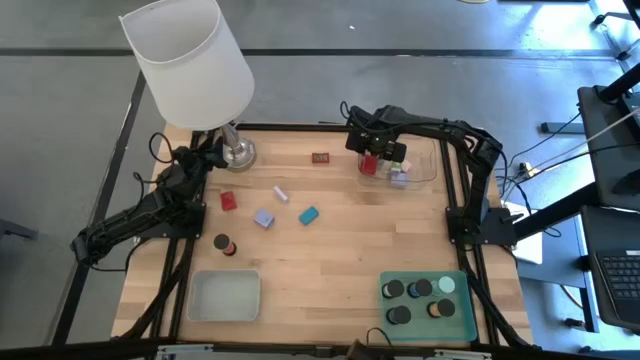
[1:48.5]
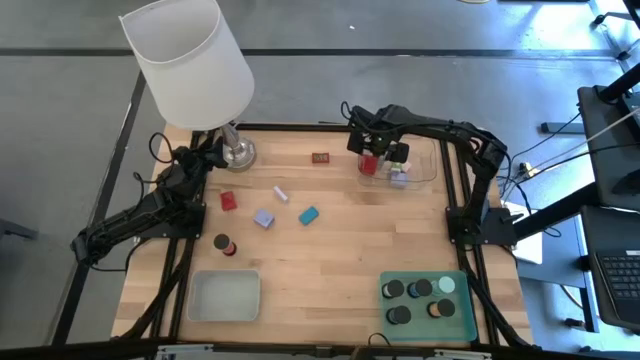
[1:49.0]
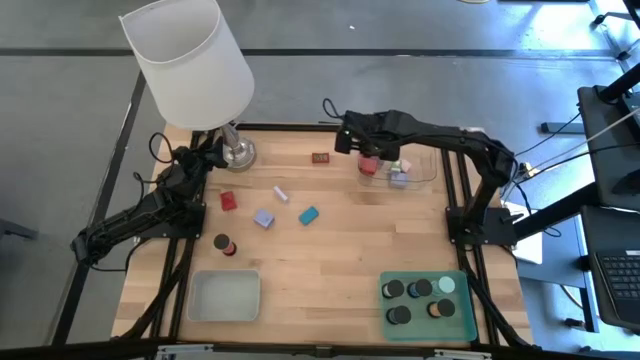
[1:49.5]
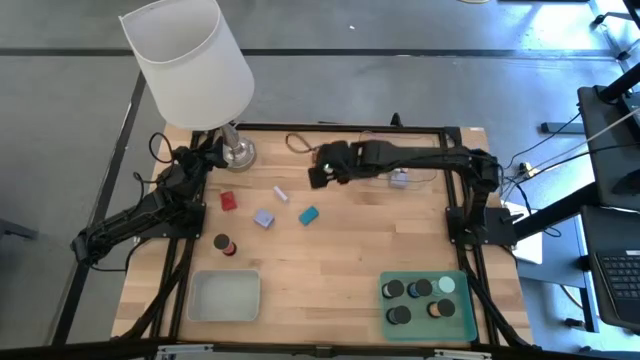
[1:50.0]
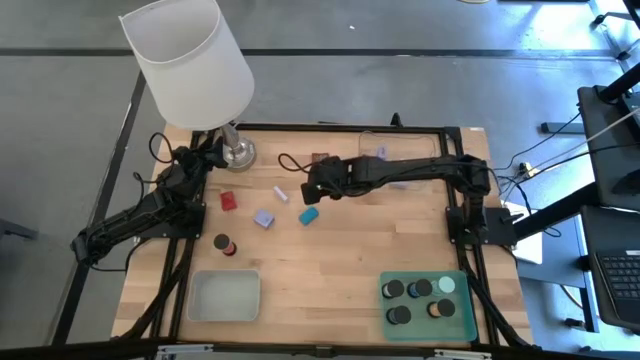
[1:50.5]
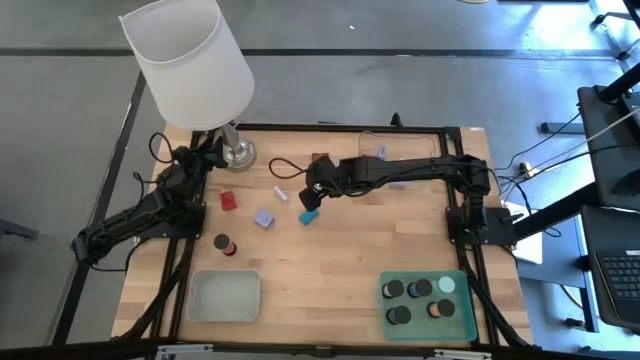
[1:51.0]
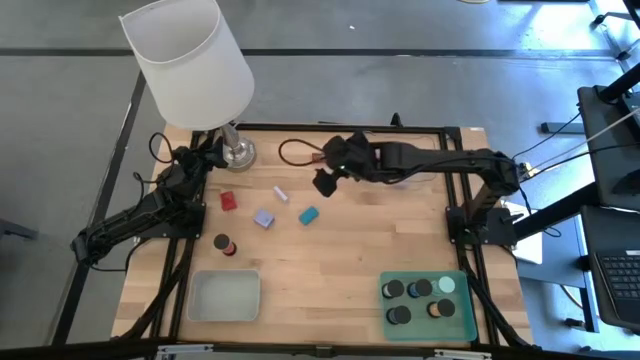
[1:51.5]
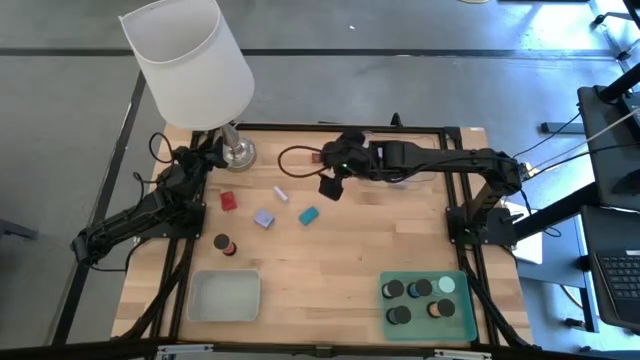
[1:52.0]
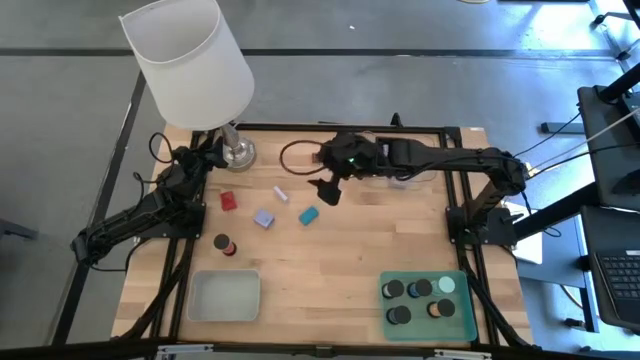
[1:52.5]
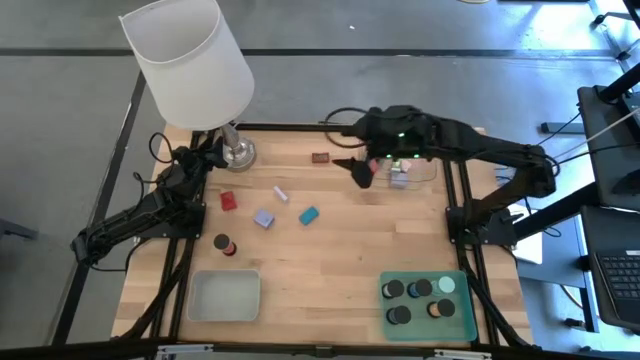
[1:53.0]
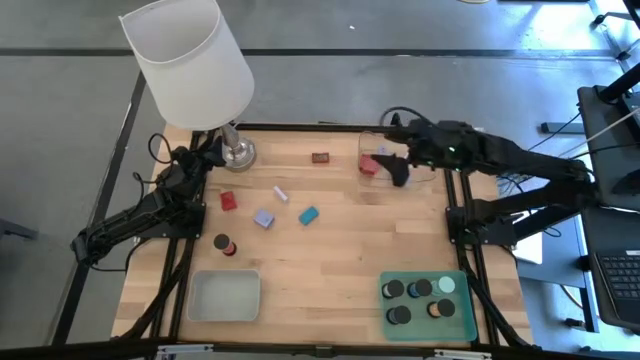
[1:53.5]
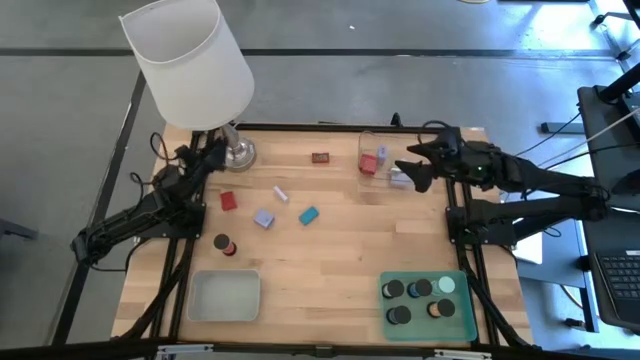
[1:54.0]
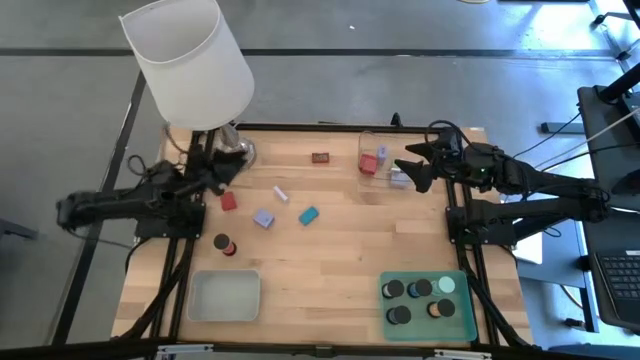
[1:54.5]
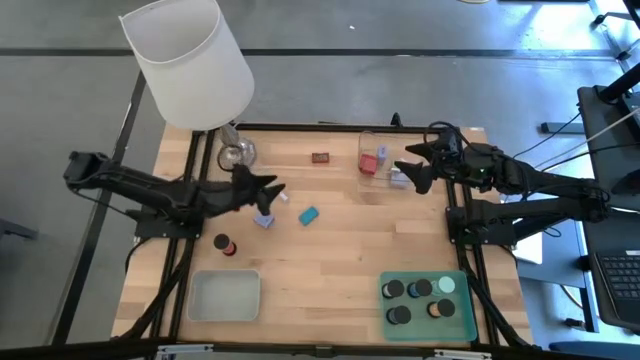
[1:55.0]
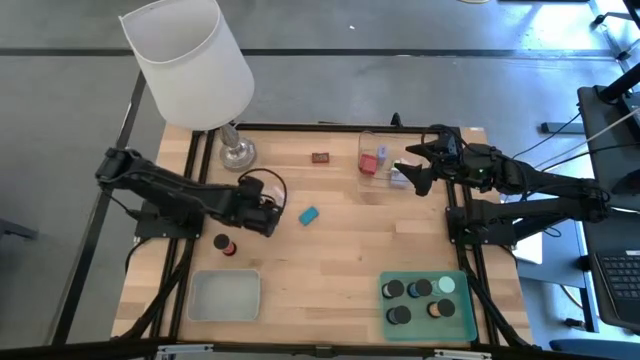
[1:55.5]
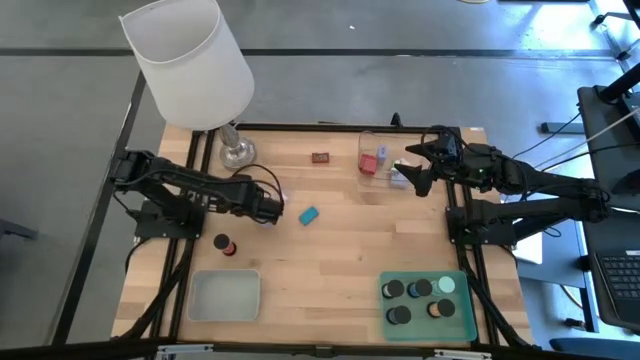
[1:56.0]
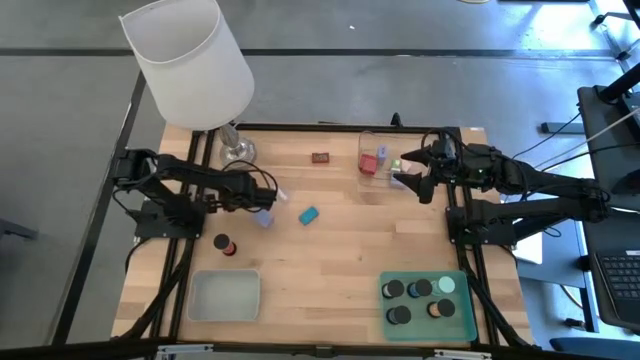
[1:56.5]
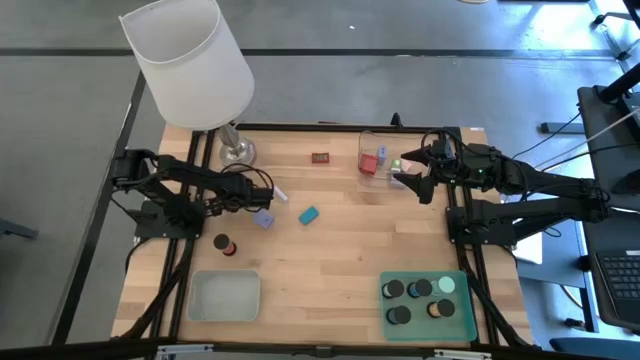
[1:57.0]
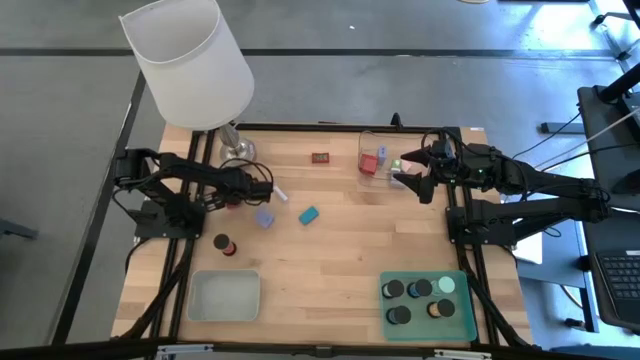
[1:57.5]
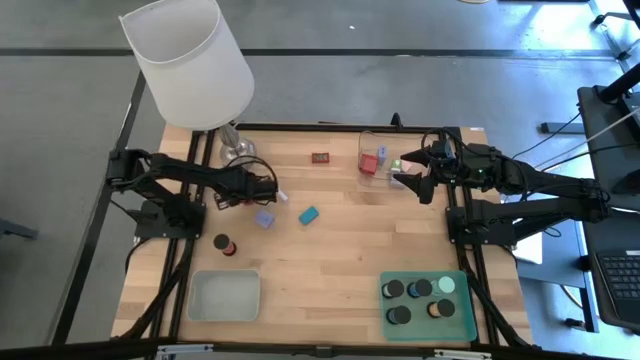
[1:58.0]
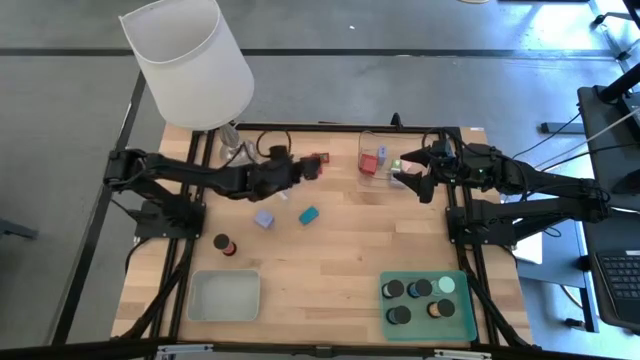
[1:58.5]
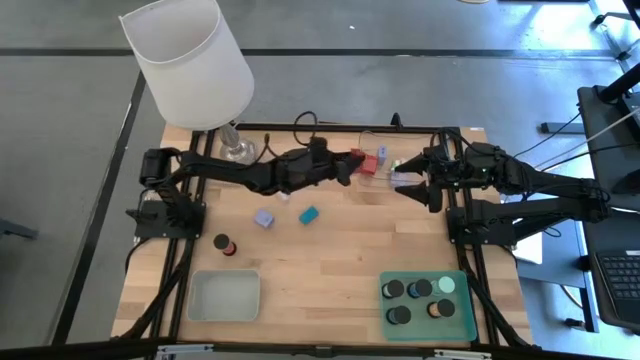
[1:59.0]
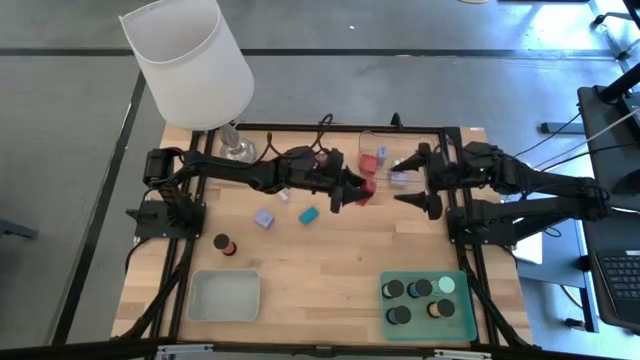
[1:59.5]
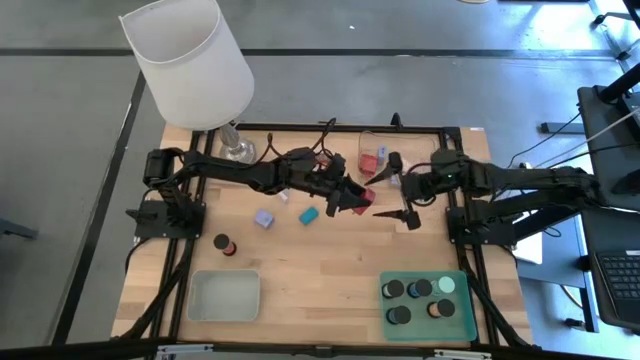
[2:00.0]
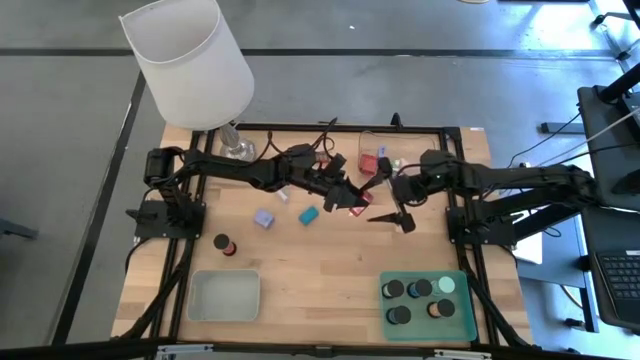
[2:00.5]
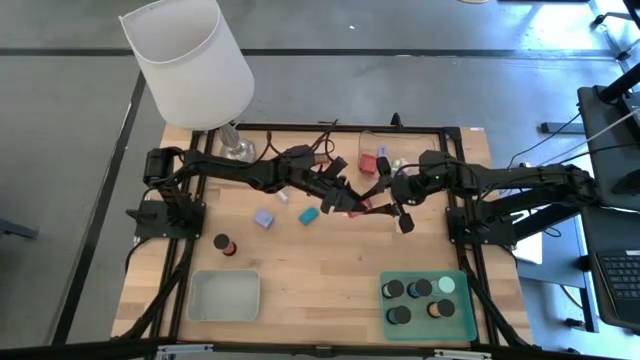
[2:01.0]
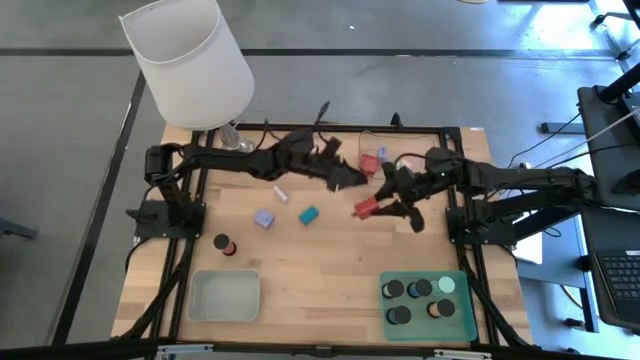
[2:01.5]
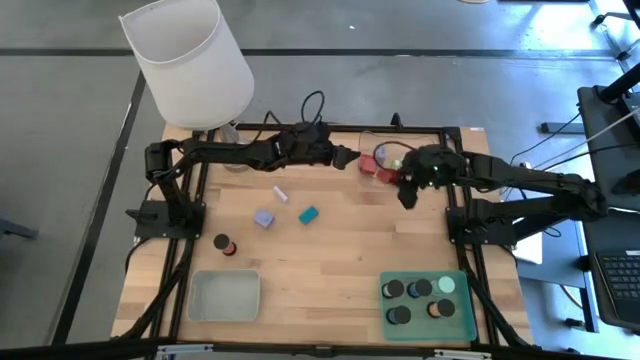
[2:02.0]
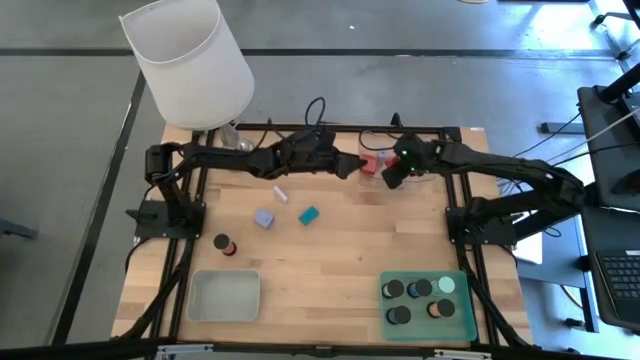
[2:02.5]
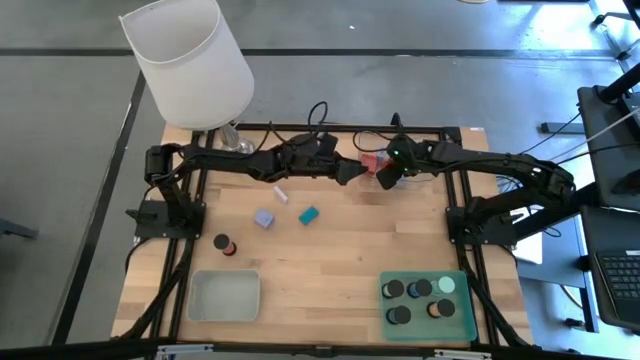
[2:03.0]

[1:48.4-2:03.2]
Task: Pick & Place Office items
Put the red charger adapter into the transparent bin

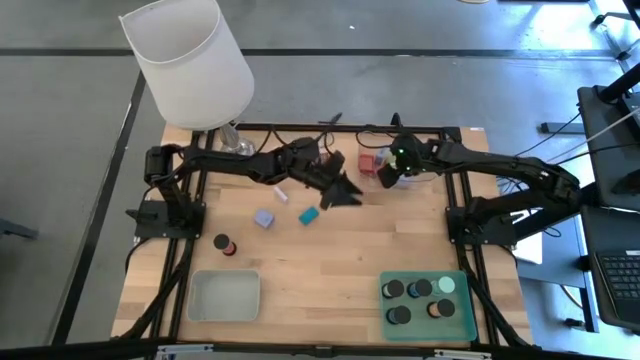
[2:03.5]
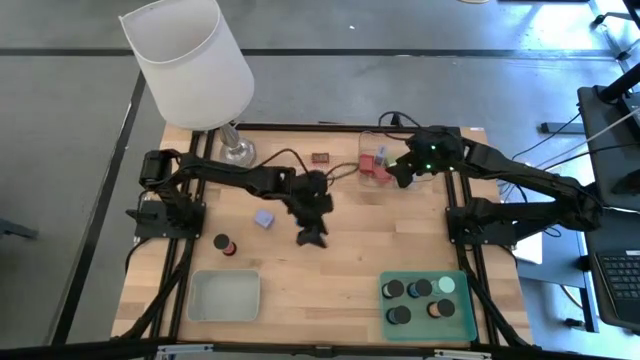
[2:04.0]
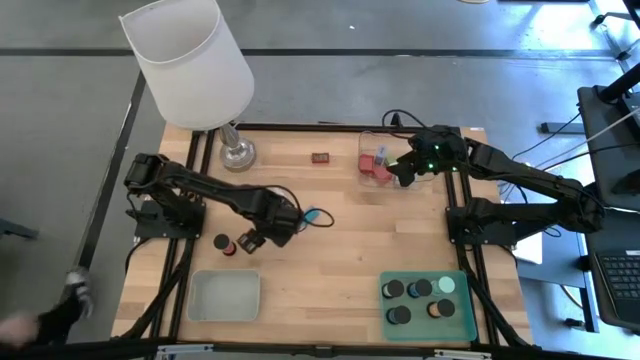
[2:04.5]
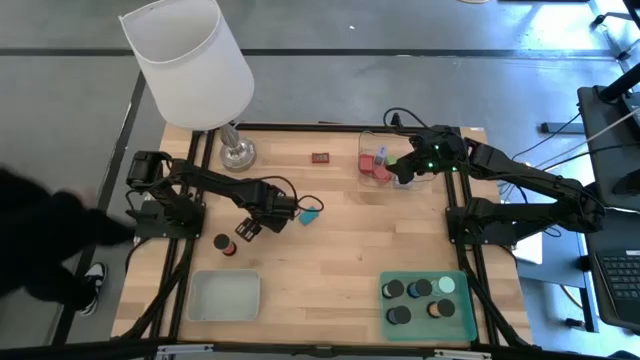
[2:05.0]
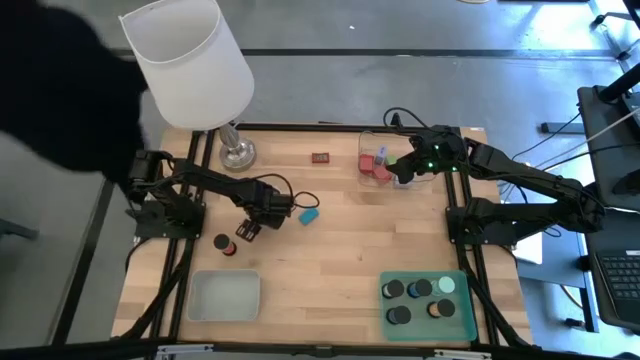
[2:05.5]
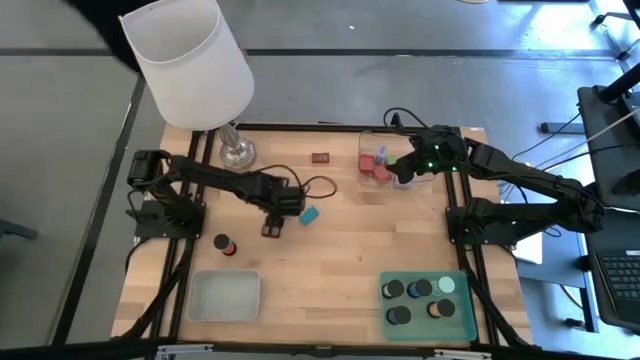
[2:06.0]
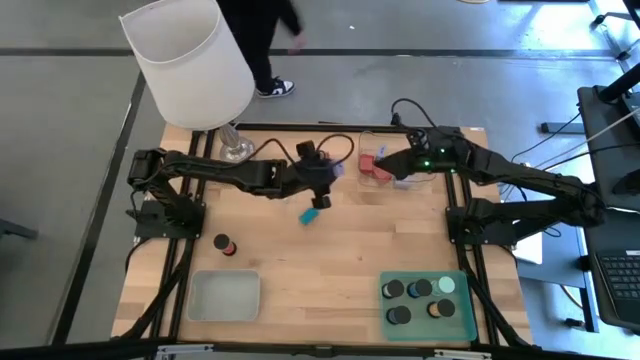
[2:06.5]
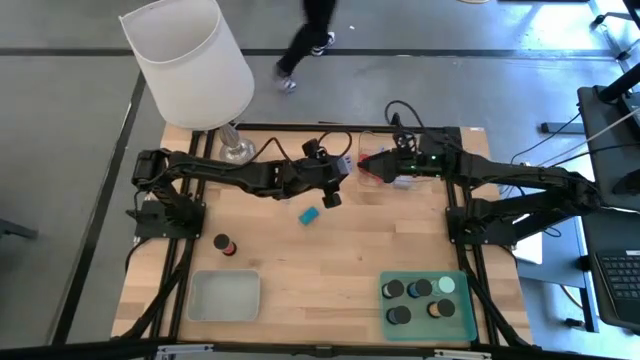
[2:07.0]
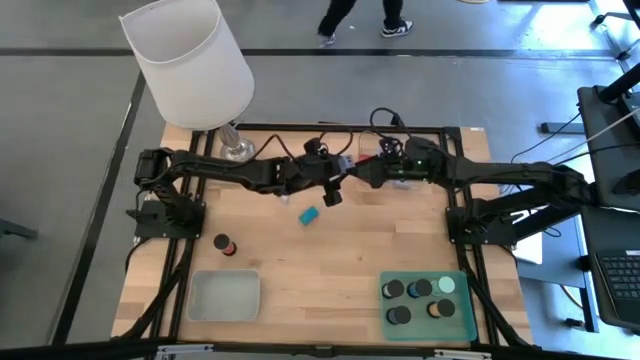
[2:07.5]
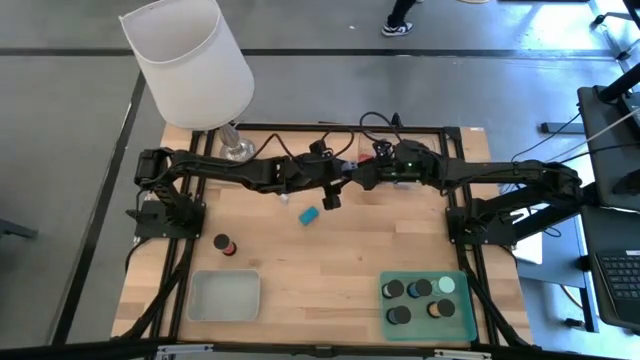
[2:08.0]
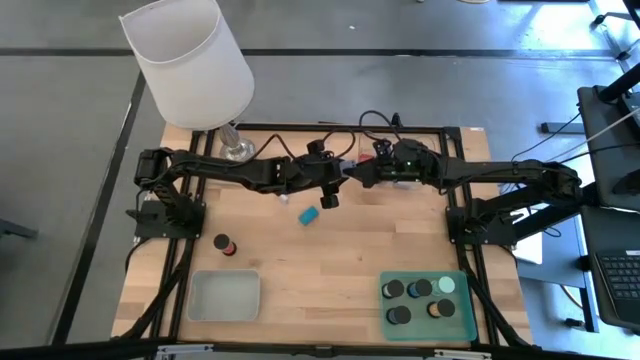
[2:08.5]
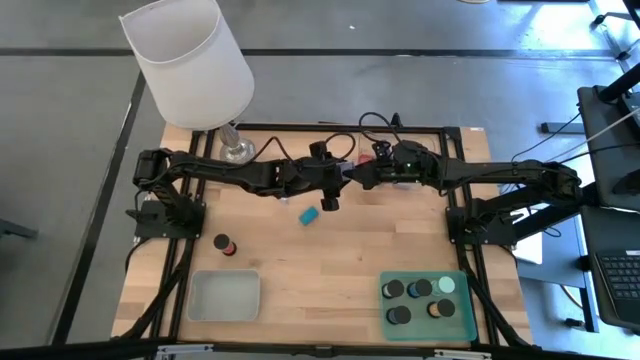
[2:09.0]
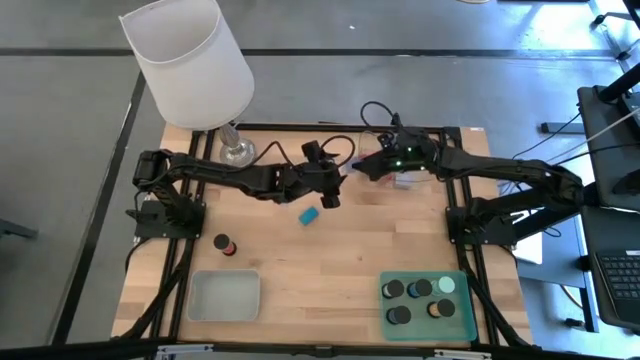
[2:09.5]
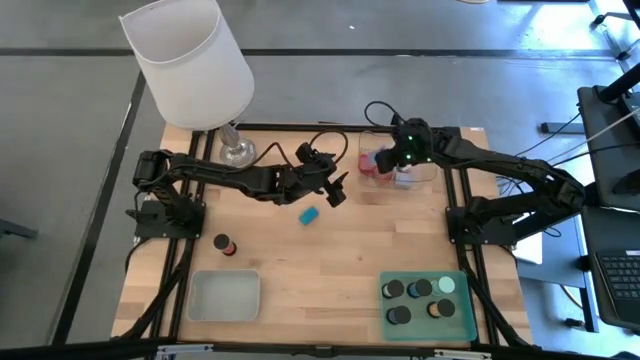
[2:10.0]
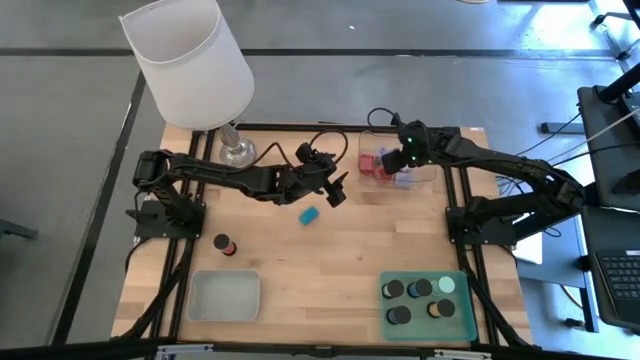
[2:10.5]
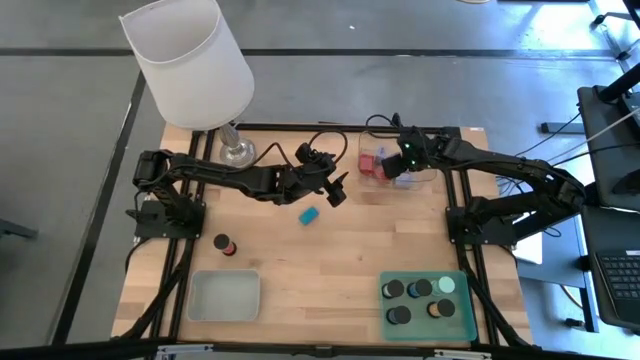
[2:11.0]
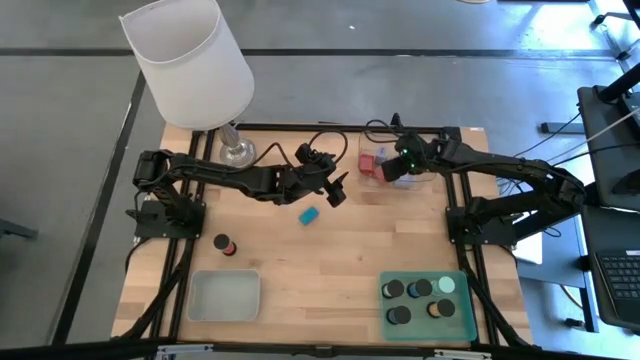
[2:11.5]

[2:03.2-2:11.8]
Put the blue charger adapter into the transparent bin
